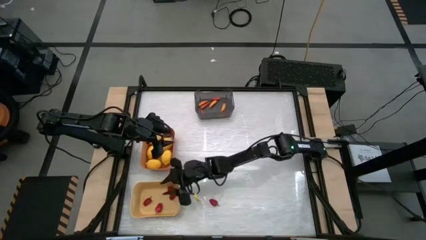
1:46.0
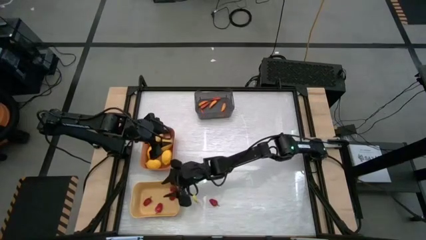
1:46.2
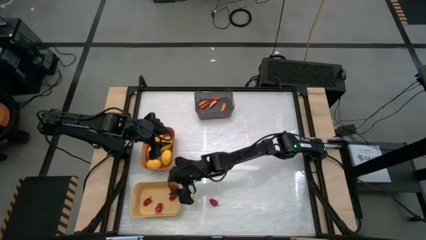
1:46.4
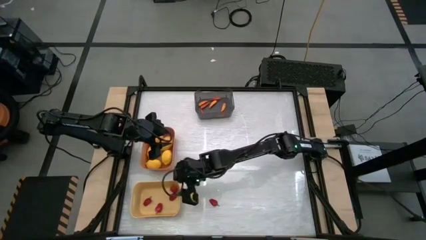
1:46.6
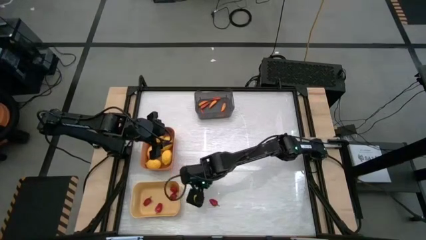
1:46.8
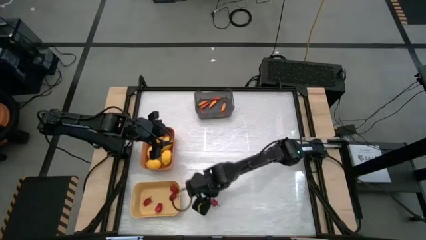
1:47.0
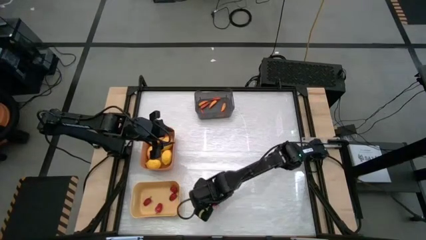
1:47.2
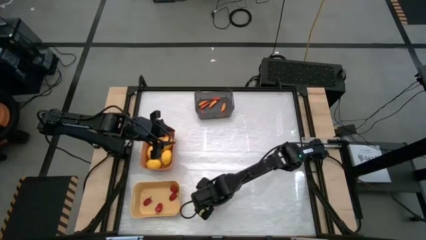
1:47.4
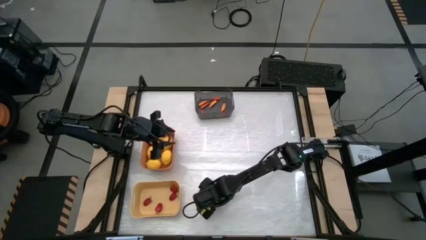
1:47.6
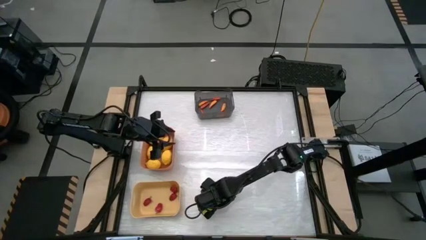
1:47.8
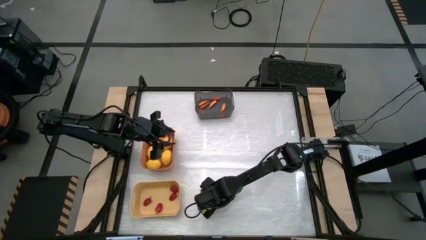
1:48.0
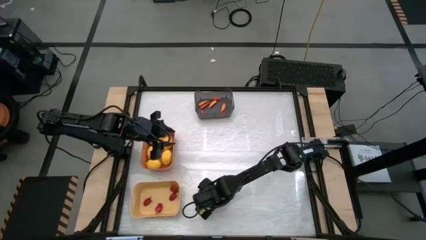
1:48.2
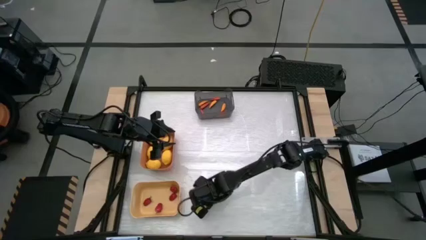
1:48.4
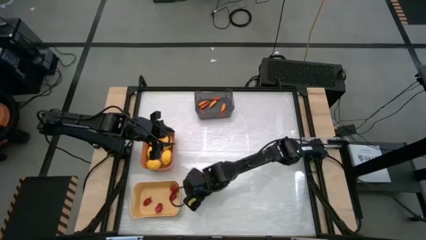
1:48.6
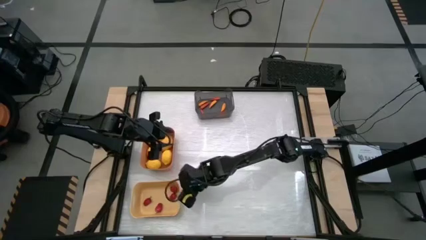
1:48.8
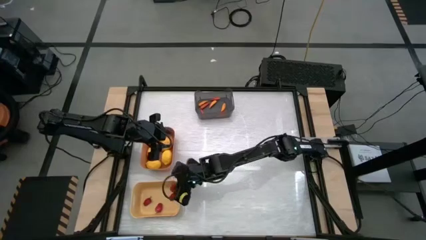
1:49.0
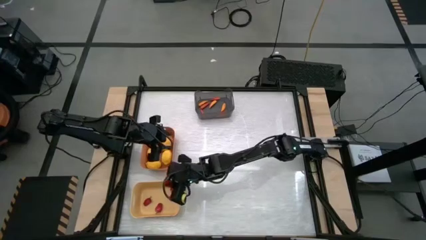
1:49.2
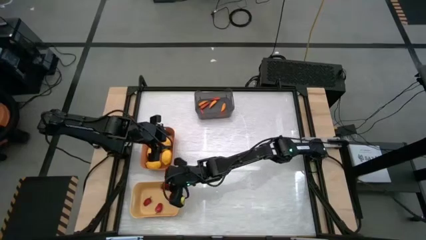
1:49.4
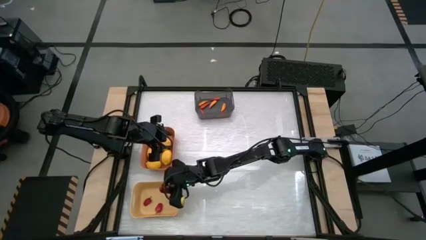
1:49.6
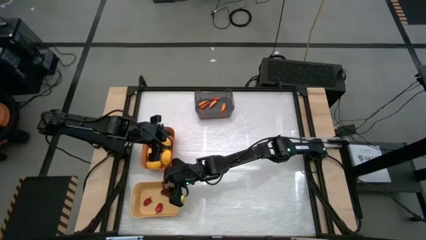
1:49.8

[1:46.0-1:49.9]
Task: Sort produce into baskets
Put the red bell pepper into the yellow bin

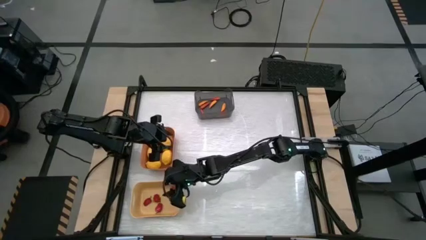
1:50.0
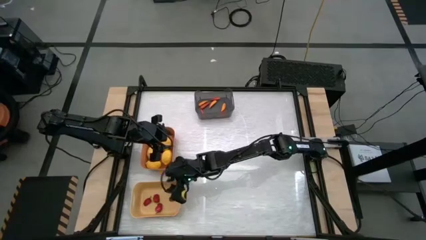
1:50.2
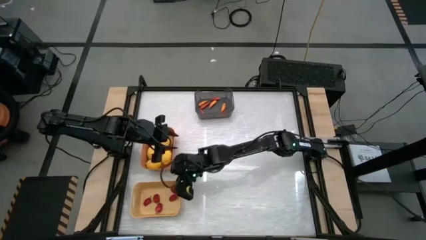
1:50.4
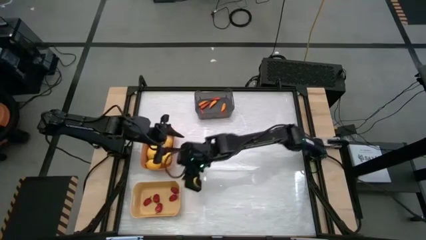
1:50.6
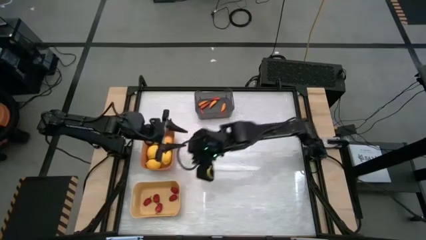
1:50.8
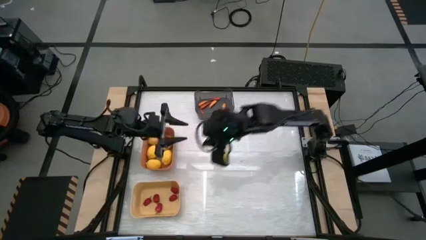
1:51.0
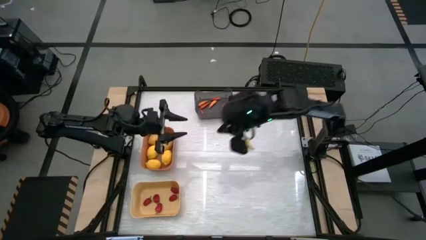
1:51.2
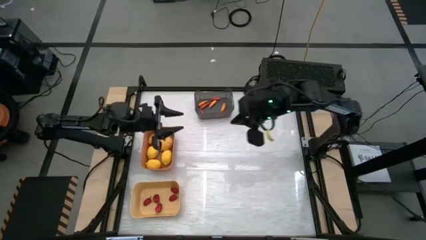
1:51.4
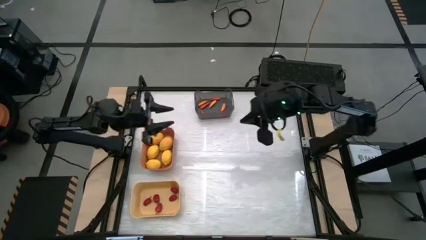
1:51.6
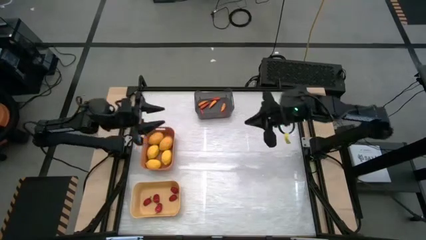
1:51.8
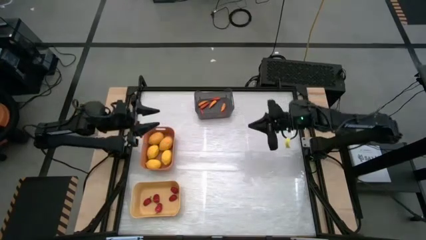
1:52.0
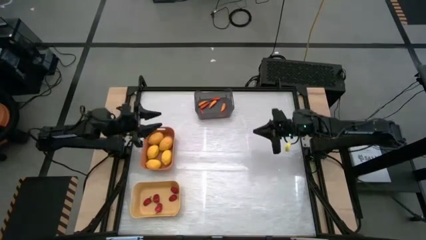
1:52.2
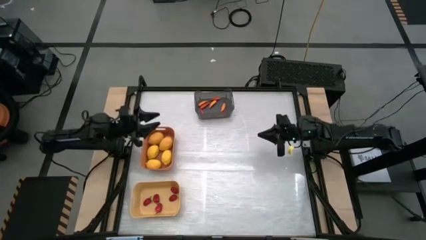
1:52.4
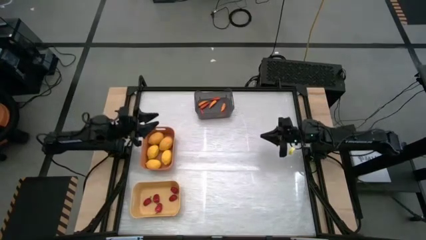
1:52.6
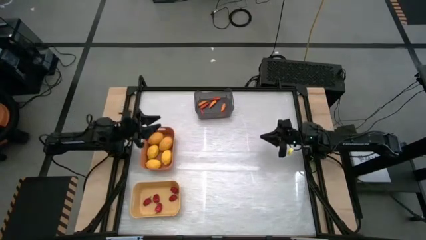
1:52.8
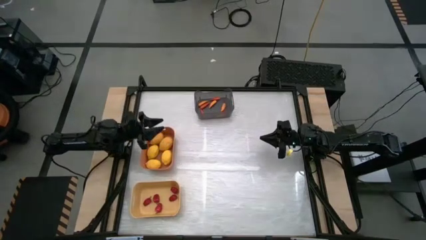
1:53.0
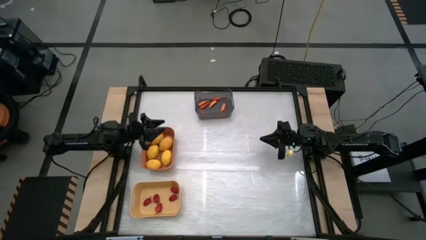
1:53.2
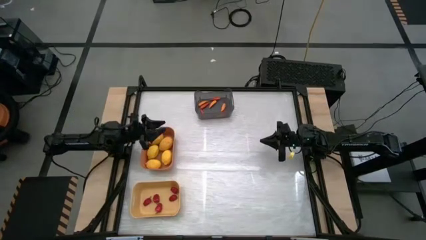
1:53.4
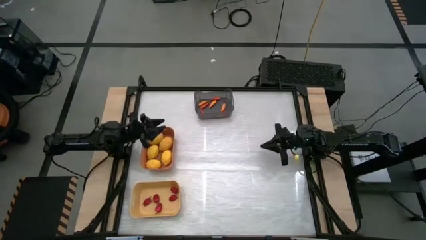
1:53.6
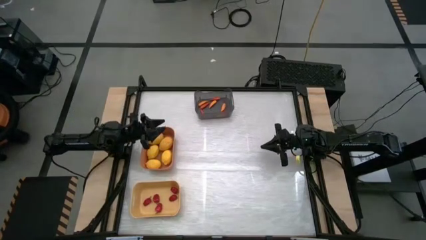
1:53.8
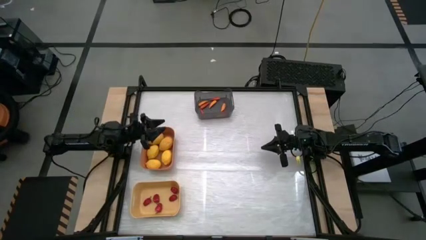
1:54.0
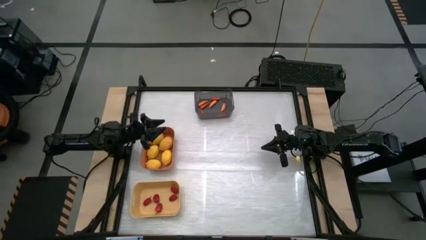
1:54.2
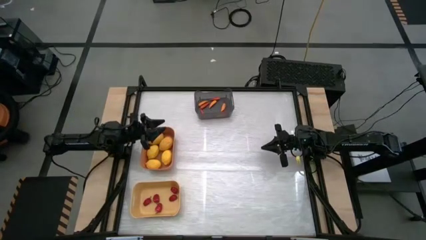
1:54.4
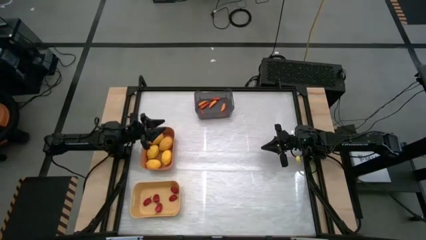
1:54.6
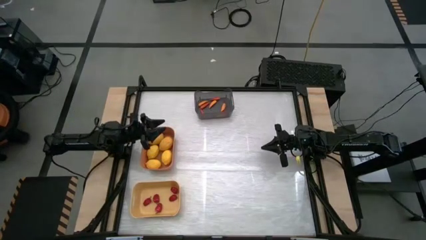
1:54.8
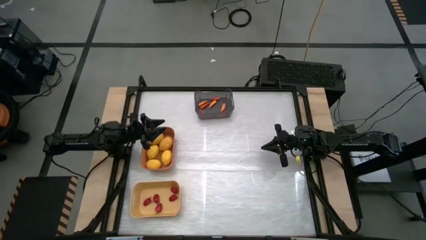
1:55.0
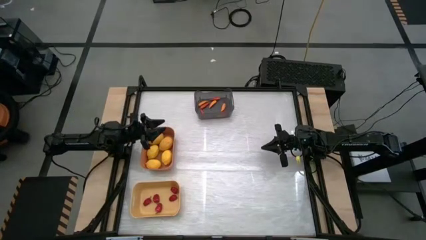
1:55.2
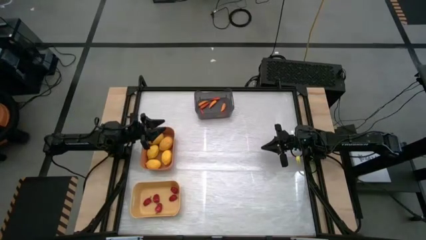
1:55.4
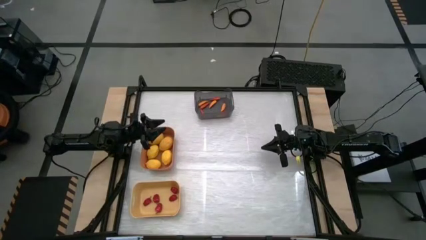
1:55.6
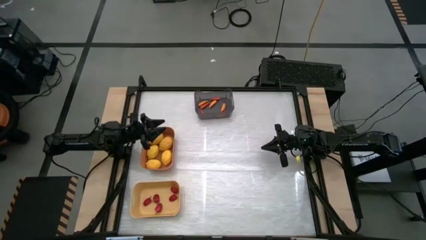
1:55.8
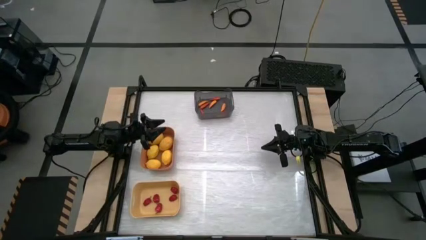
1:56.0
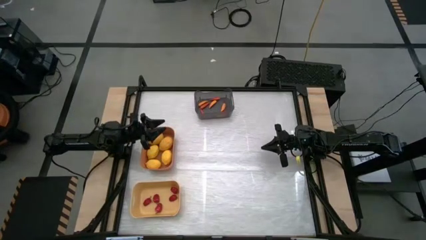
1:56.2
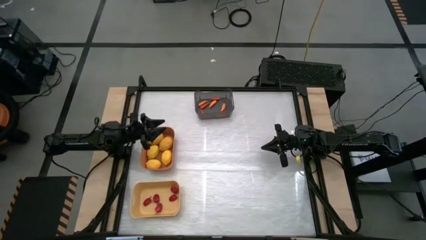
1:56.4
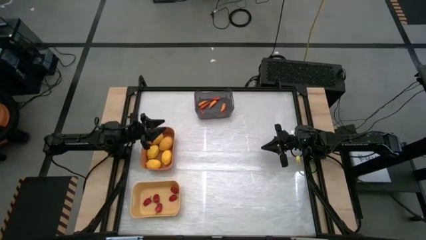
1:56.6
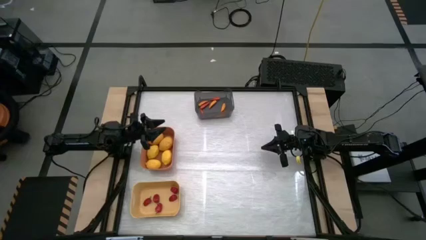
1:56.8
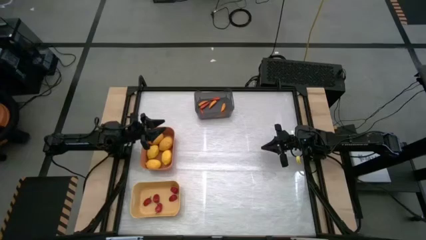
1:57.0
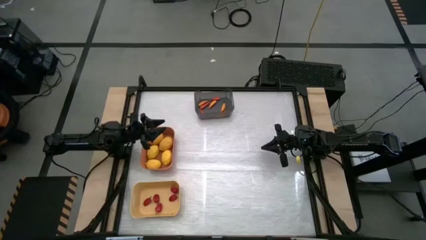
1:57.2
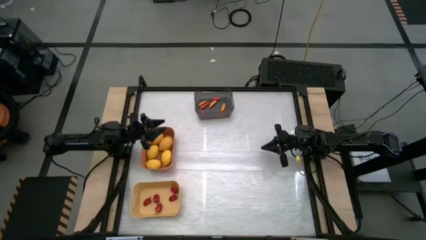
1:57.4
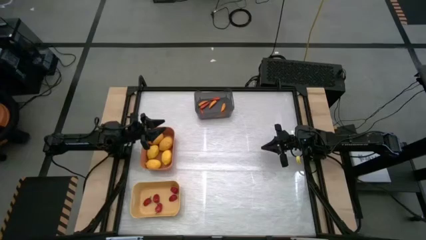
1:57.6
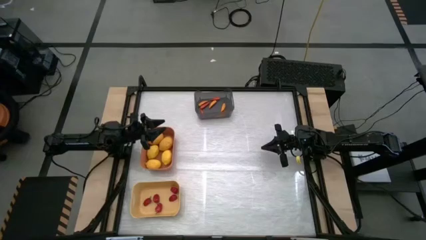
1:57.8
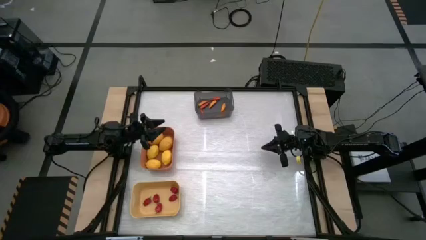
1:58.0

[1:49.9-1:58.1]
Return to Home Position

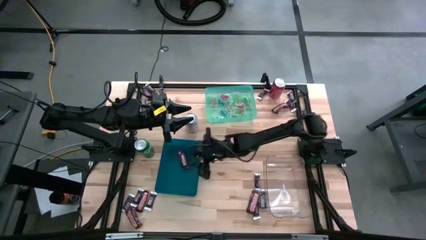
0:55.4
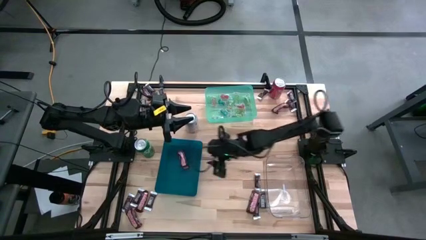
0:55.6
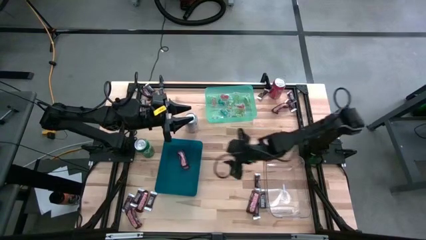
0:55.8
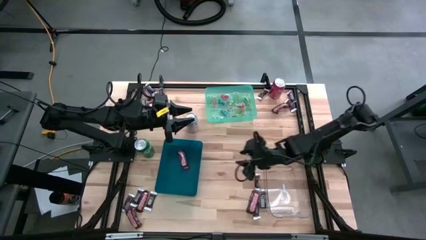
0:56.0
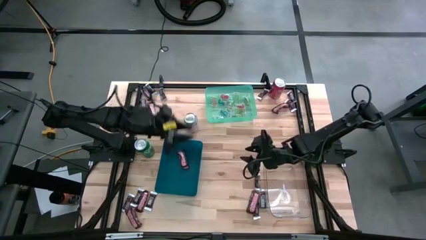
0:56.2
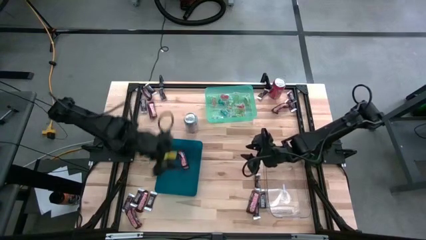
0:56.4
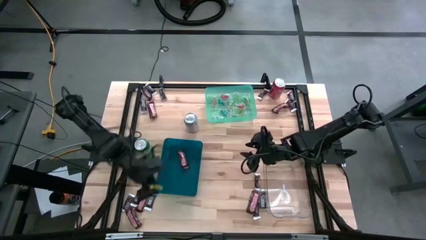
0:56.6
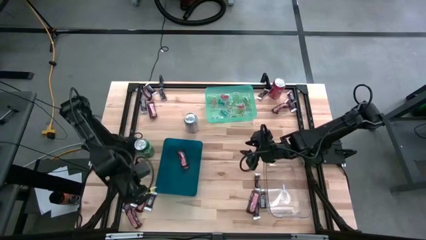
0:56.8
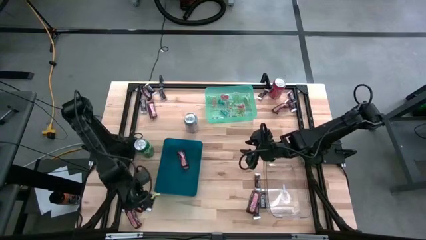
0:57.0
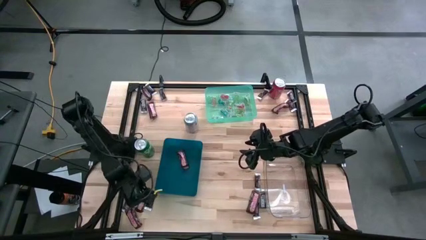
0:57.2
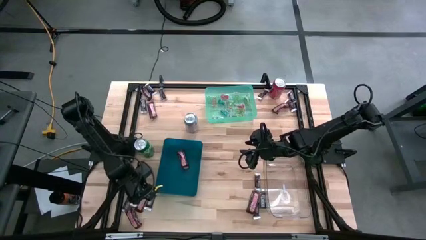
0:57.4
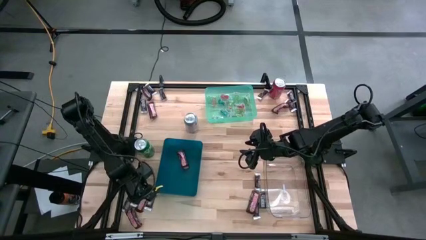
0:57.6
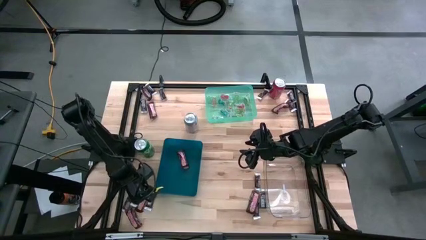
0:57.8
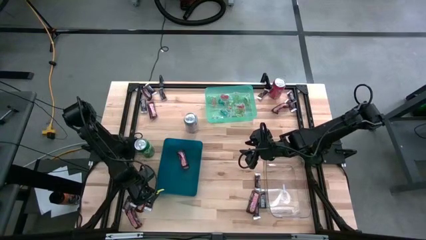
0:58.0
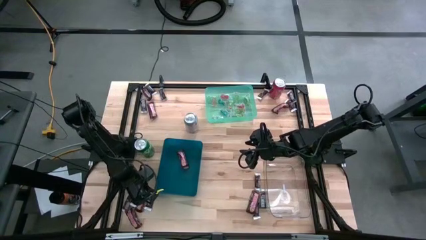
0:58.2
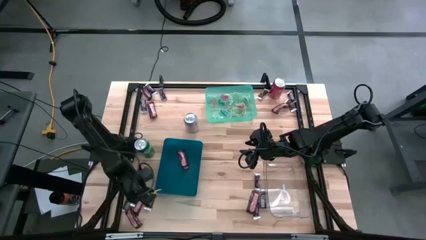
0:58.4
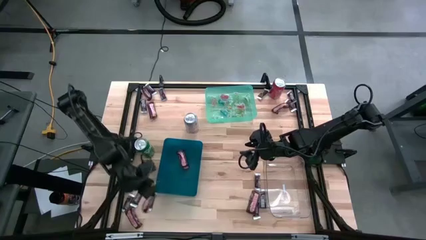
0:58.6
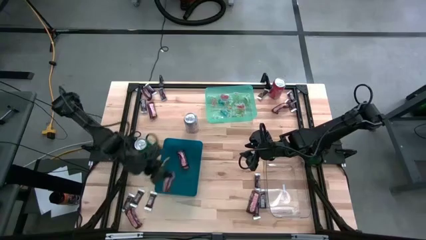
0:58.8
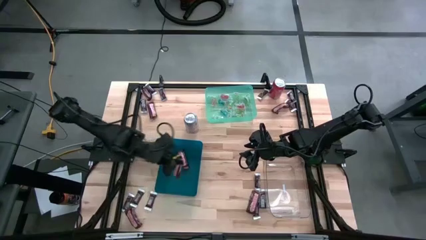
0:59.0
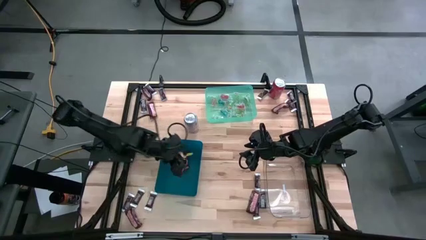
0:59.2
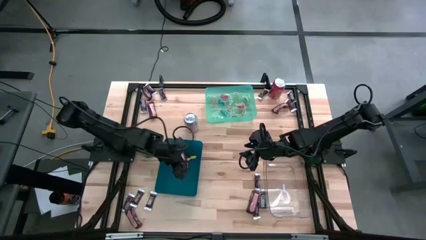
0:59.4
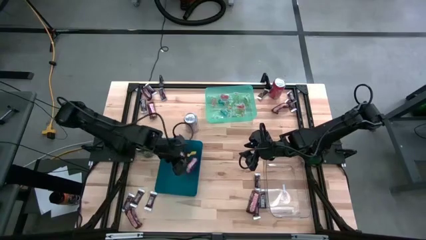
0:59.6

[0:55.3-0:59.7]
Task: Organize candy in baskets
Put the brown chocolate into the blue bin

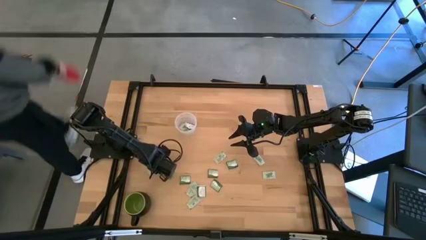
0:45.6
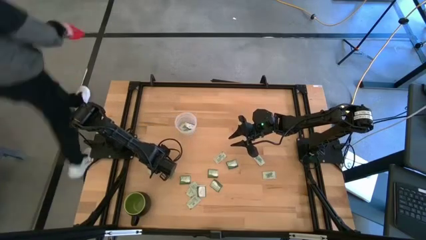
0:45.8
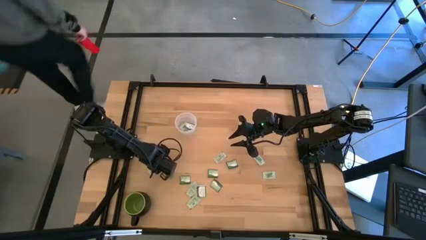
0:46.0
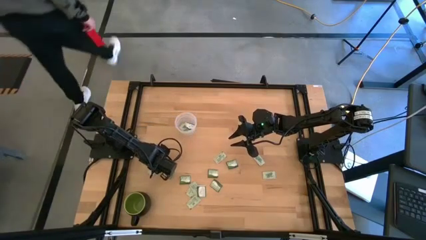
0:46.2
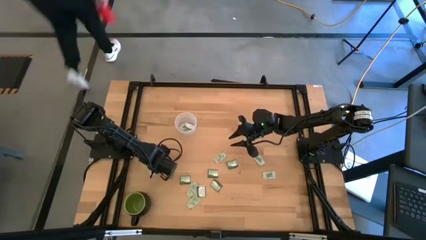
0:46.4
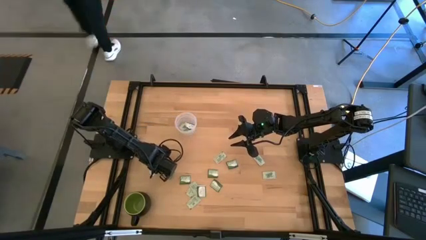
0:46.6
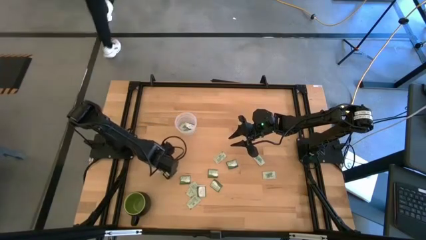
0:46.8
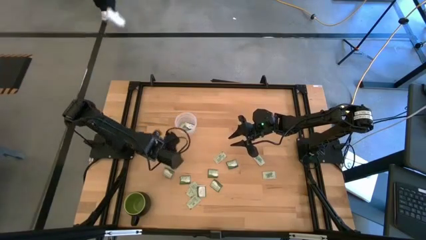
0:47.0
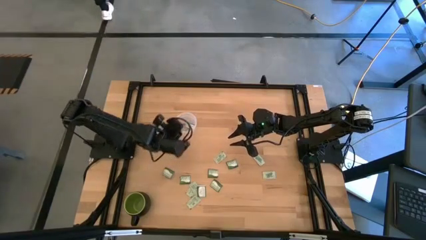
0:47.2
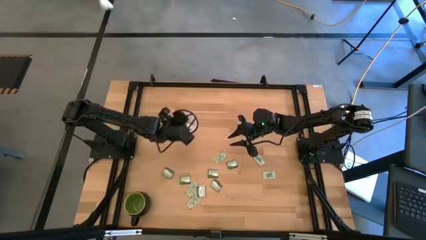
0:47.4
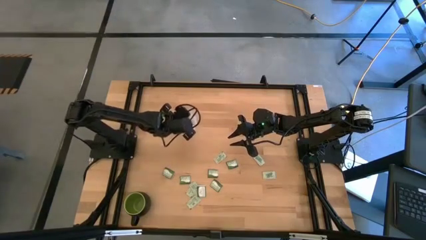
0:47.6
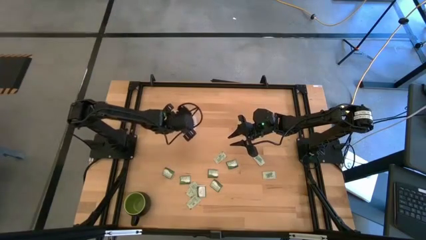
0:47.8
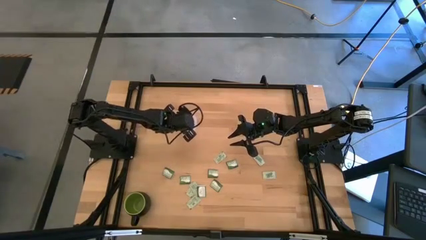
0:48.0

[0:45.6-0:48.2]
Task: Pick and place Stevia / Truvia into bins
Put the light green stevia packet into the transparent container
